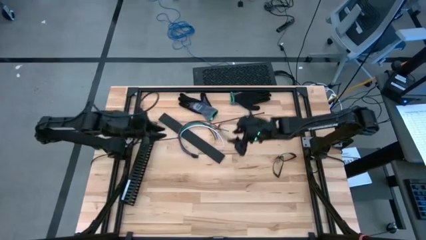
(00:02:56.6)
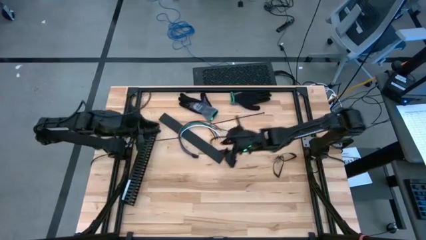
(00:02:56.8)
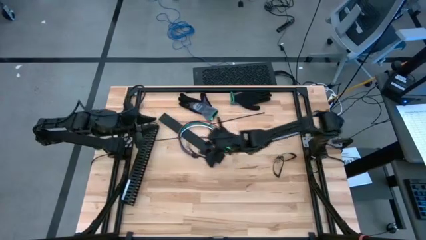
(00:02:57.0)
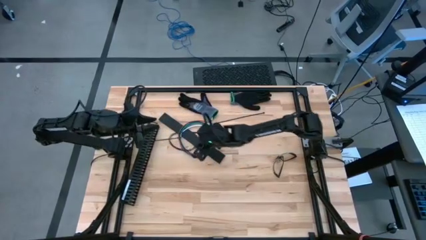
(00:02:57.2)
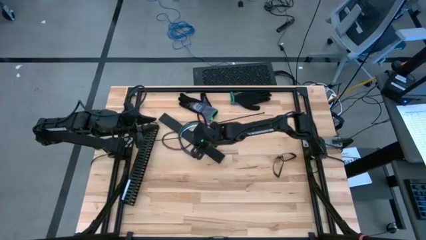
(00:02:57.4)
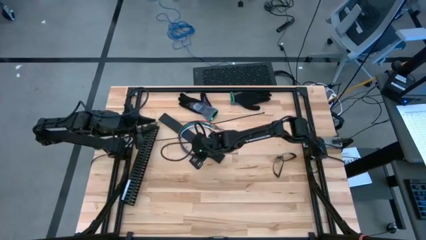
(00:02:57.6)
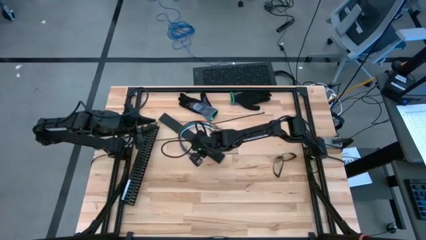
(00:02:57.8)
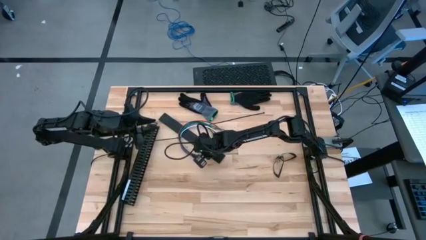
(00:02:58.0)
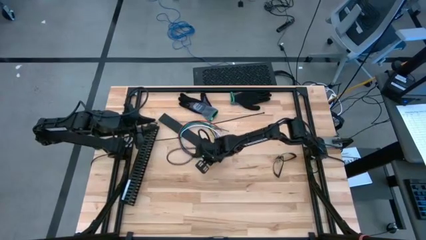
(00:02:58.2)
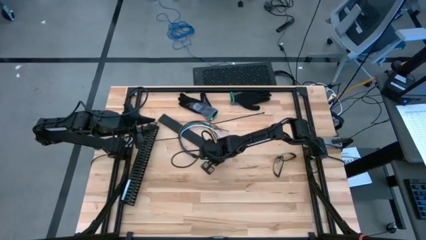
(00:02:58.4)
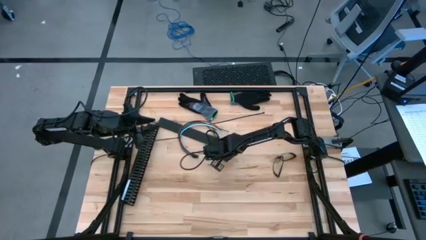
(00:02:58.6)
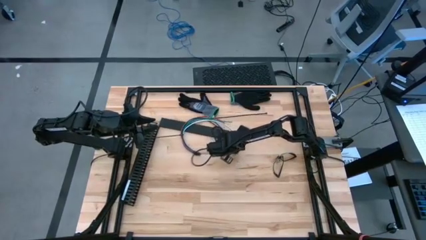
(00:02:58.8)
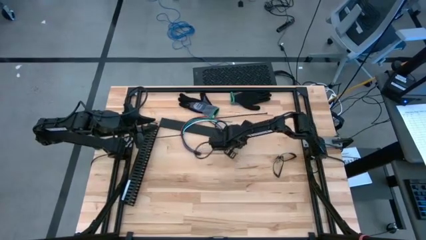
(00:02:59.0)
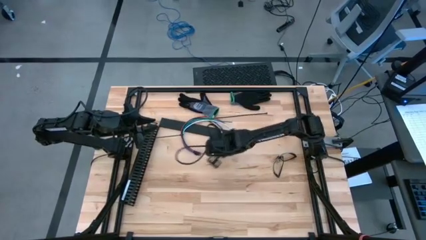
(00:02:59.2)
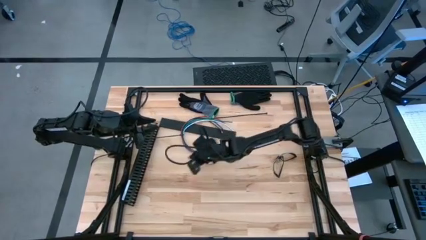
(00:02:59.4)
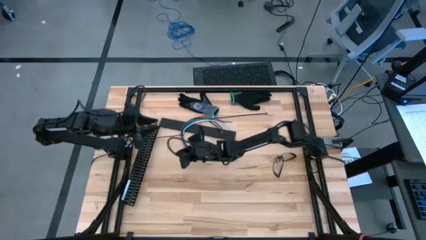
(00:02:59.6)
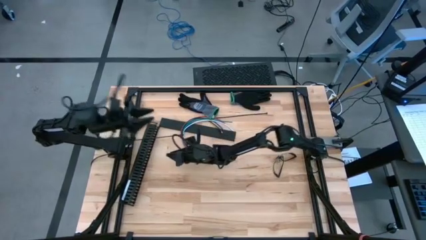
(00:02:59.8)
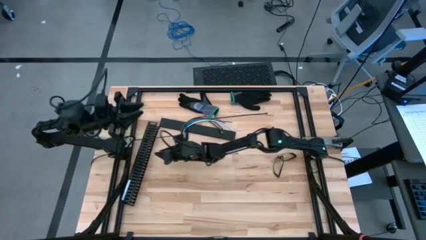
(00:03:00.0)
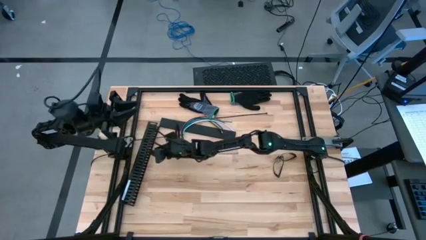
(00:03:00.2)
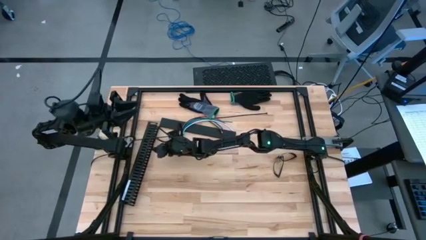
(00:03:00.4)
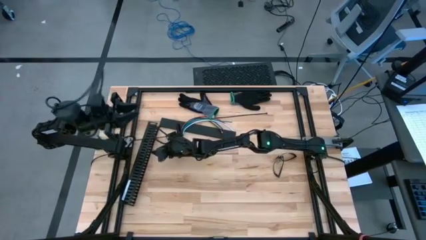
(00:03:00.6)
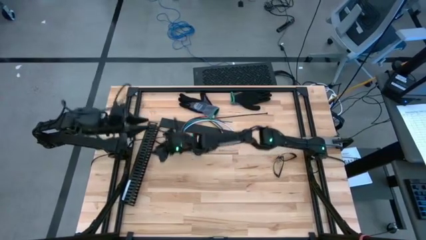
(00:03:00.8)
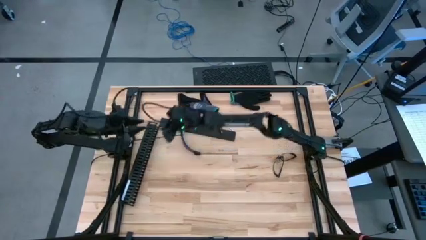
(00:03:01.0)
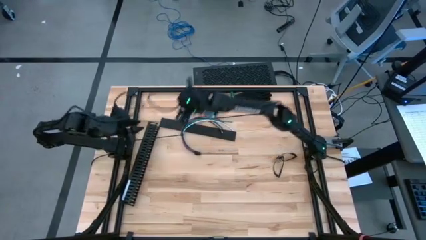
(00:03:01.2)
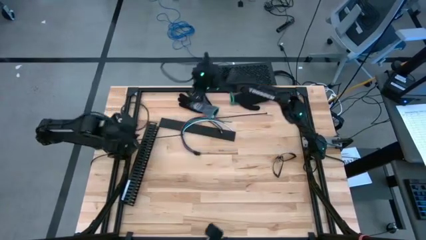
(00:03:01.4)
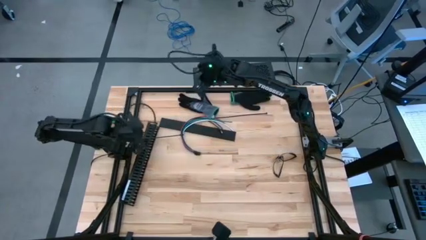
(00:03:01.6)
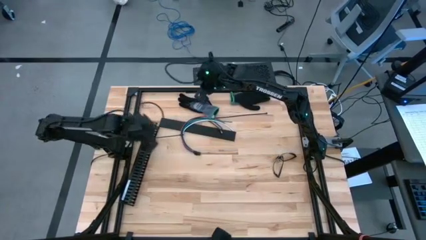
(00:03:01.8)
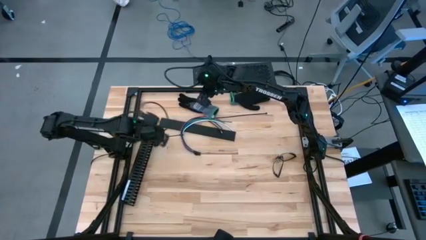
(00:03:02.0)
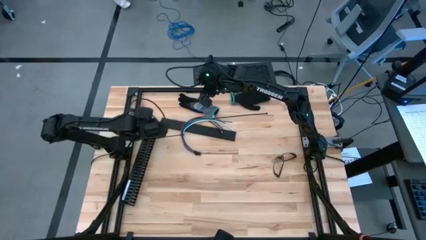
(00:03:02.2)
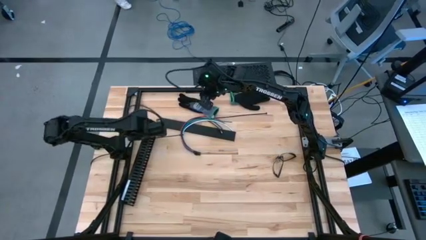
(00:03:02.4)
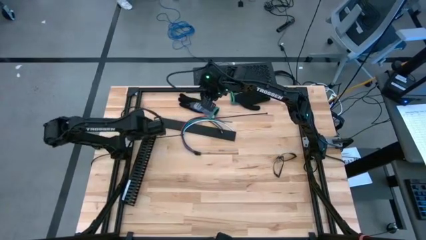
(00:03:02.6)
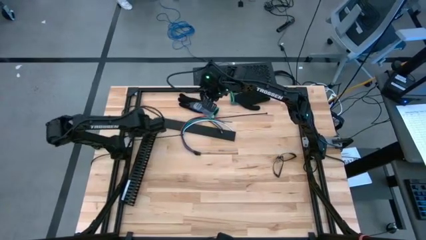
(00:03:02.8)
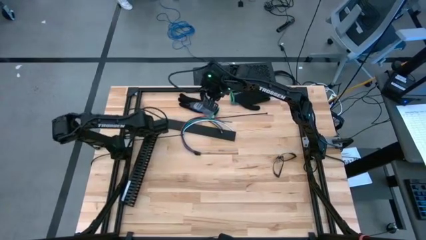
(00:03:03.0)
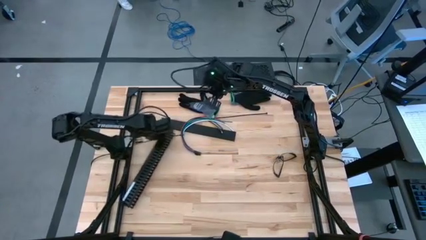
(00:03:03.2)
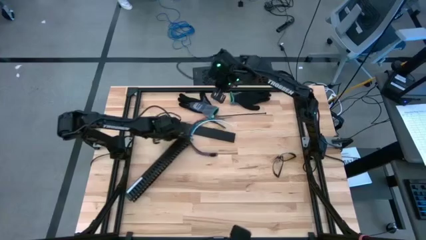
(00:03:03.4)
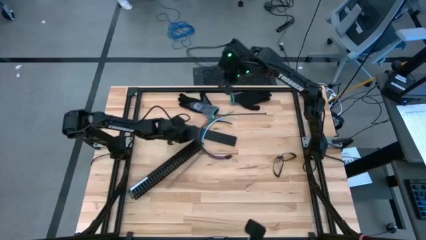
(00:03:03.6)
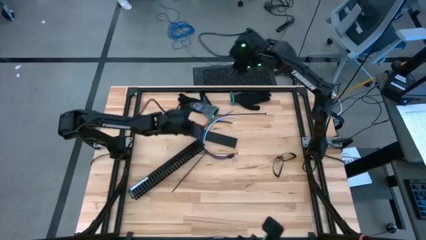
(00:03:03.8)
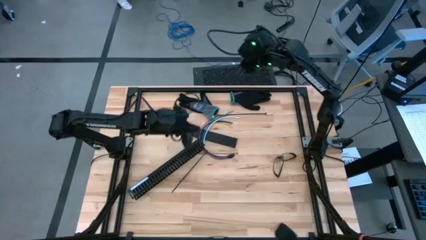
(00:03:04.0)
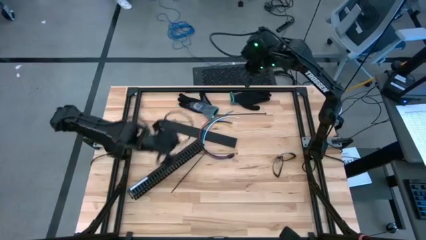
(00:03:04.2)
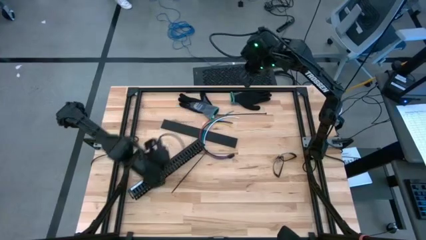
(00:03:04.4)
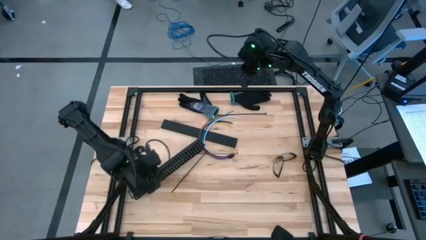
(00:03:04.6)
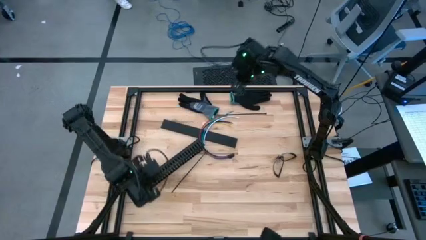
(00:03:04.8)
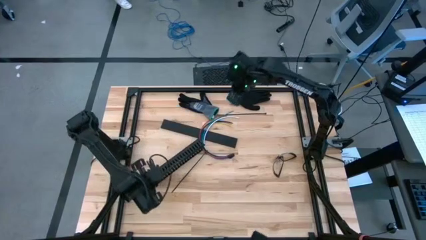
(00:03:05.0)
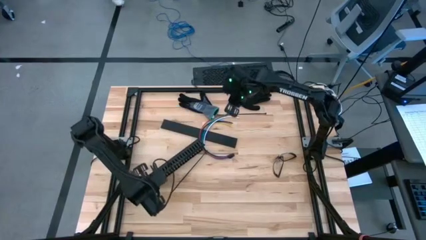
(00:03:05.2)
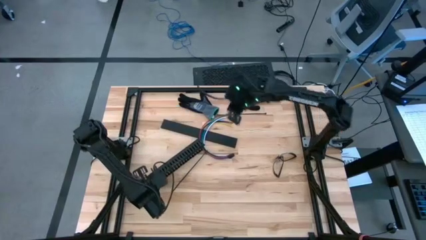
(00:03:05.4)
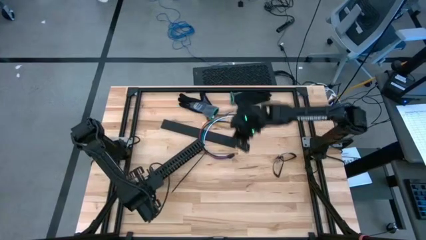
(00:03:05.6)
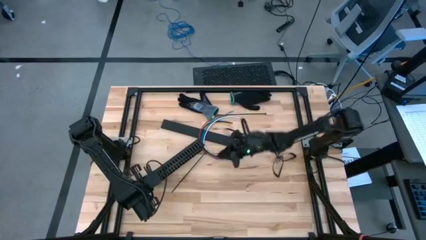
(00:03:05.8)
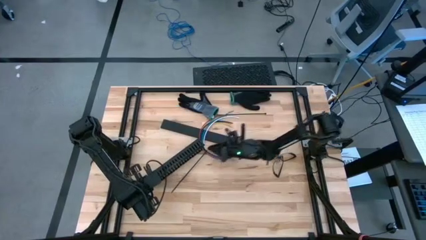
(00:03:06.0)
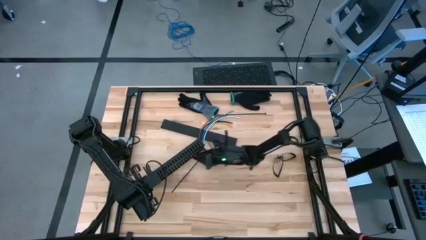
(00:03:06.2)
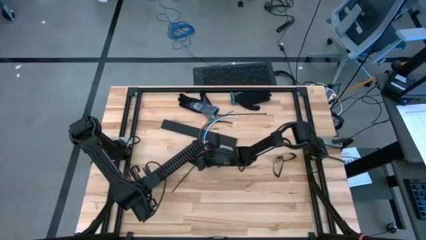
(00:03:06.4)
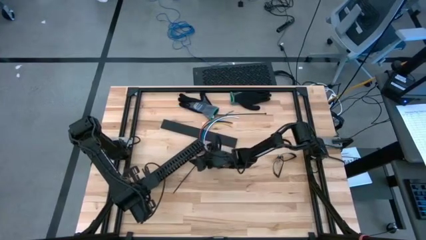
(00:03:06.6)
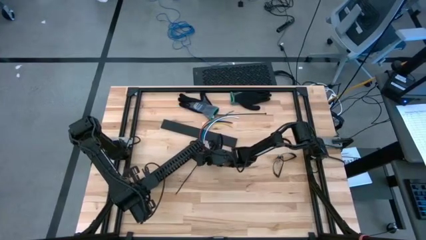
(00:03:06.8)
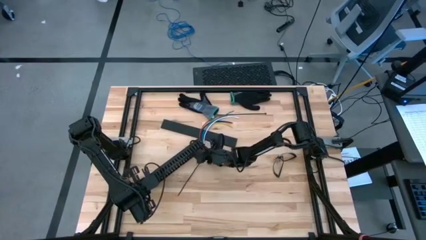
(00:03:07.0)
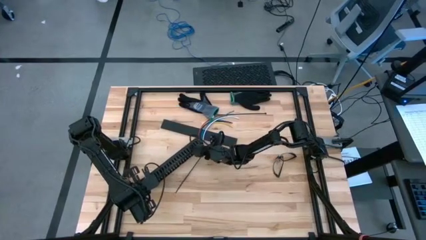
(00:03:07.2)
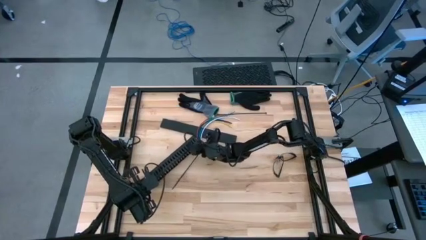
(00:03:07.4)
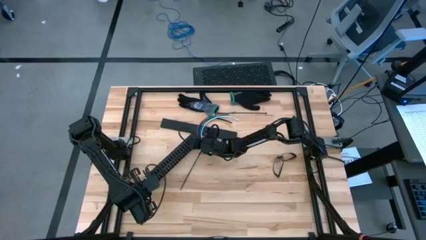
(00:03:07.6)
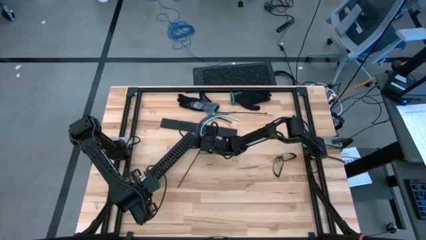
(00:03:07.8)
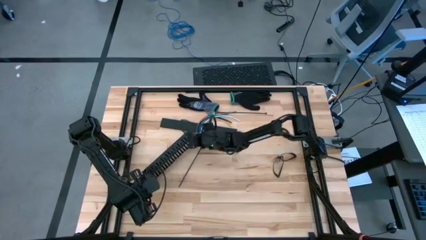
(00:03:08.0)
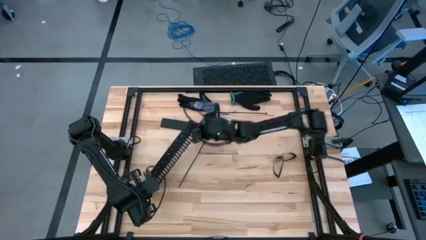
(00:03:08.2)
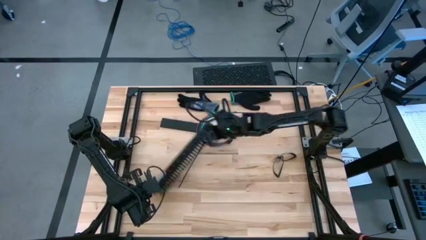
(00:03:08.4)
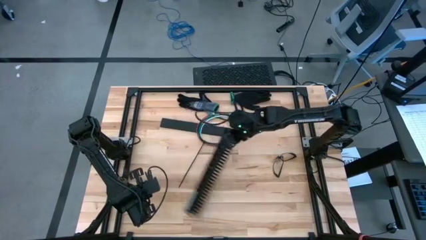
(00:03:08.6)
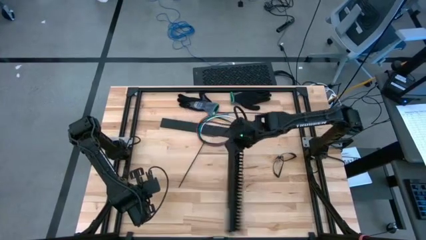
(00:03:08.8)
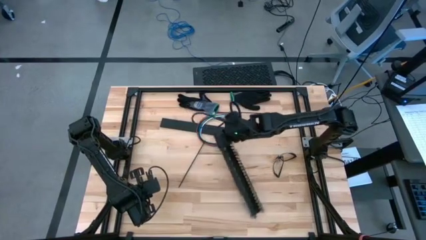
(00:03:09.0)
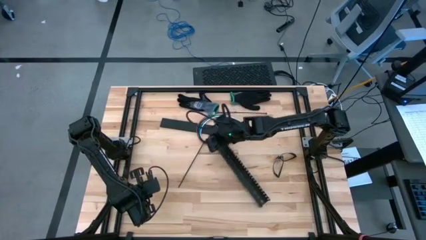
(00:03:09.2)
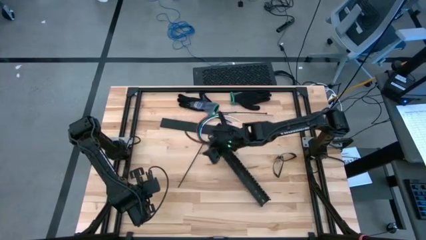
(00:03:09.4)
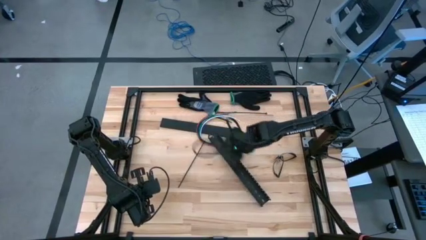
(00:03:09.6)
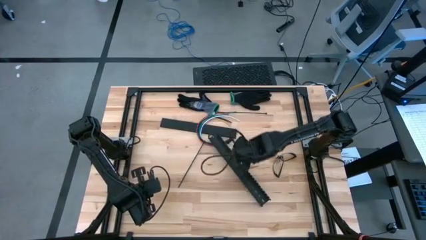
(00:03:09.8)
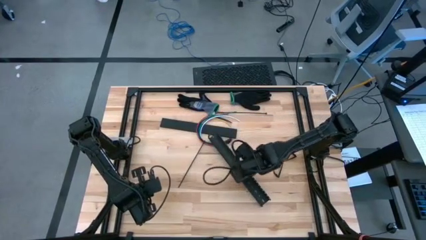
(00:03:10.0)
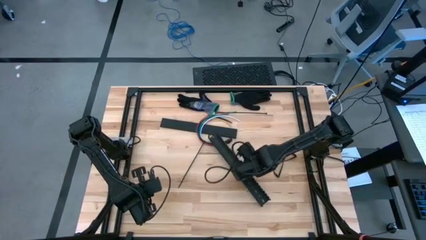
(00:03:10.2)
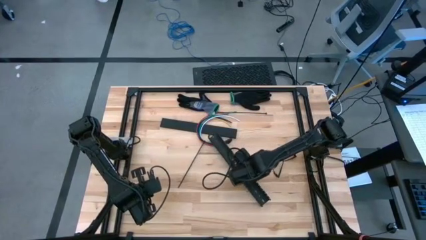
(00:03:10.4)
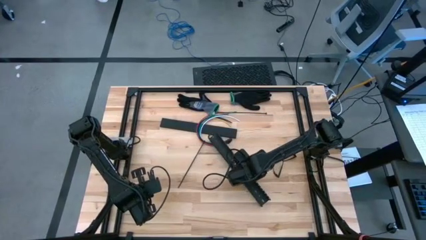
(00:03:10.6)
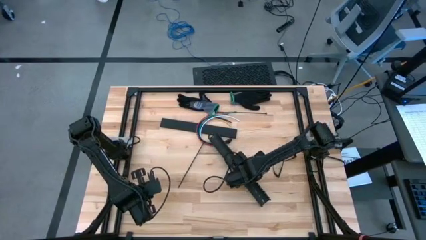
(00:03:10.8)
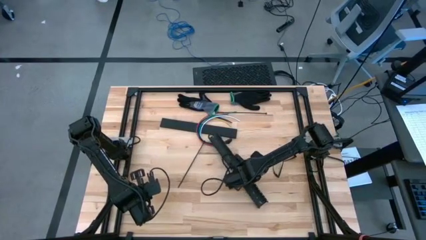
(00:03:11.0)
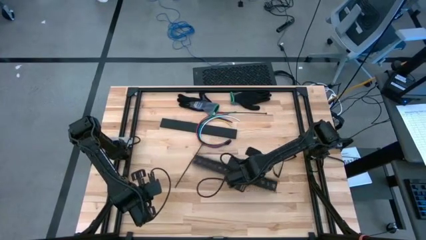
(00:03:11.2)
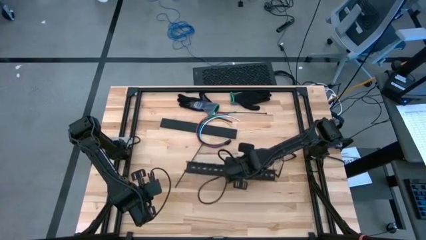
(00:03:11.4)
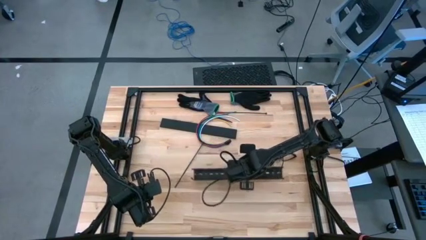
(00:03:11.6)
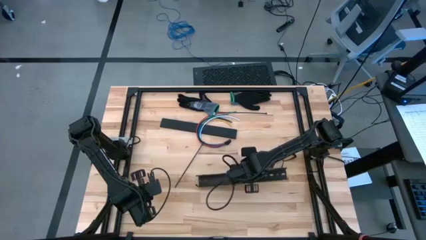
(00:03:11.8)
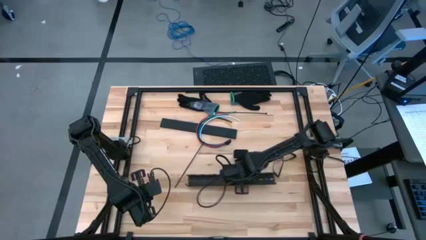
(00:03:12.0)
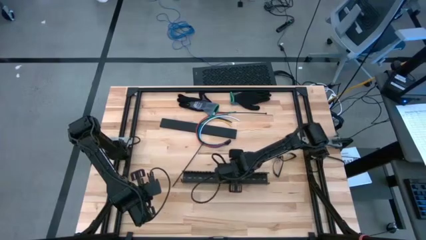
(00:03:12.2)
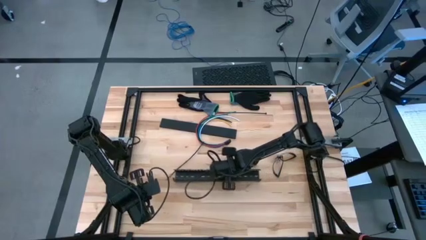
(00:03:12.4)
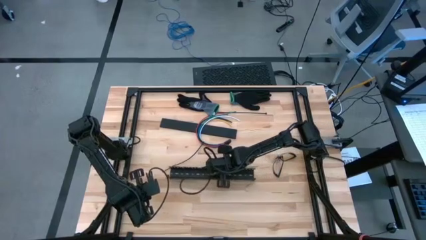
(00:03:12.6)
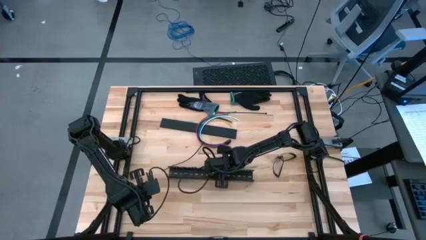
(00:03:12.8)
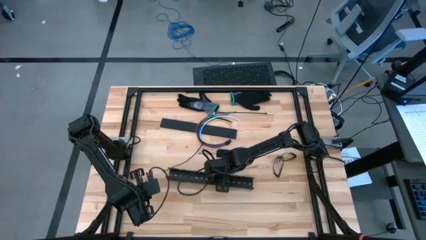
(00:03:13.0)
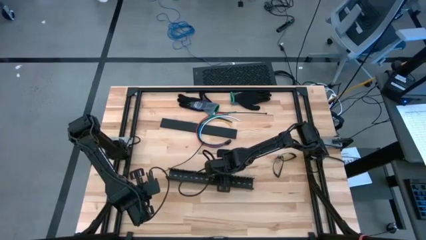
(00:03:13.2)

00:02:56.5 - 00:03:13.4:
Task: Ziptie cables
Move the black cable duct to the center of the table
